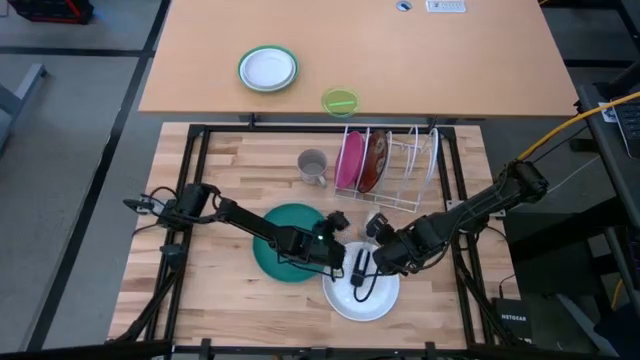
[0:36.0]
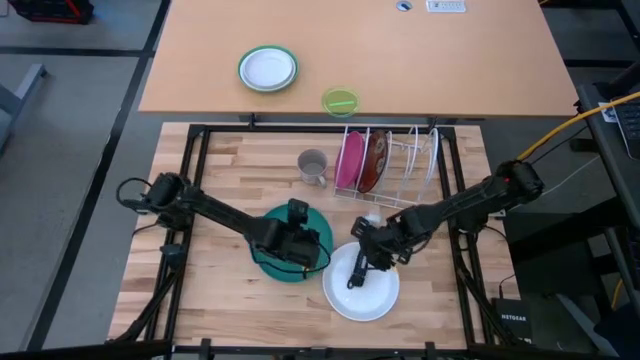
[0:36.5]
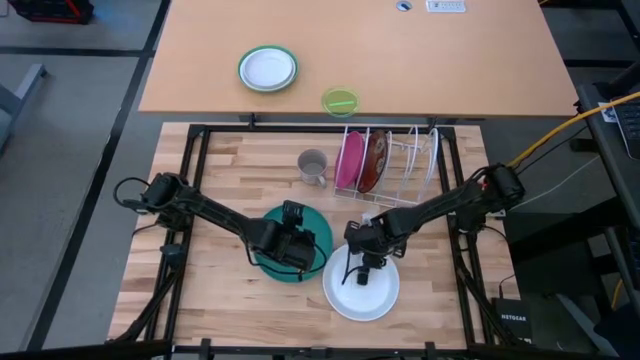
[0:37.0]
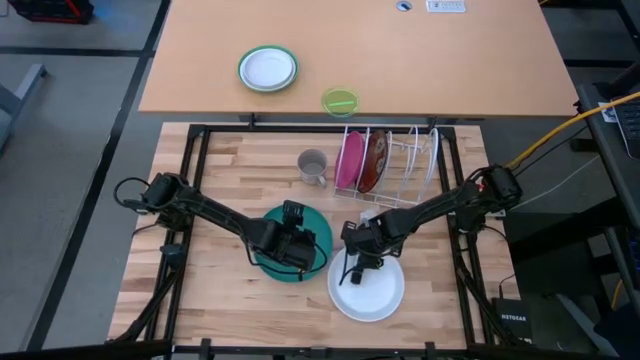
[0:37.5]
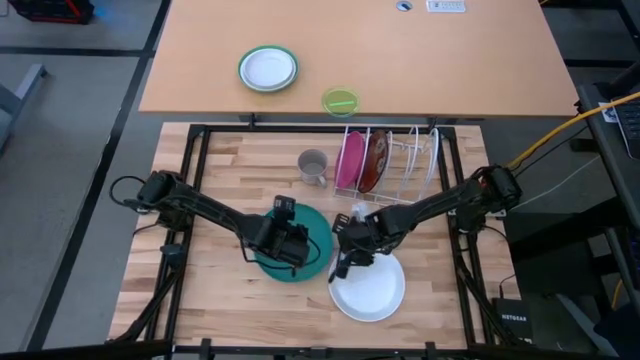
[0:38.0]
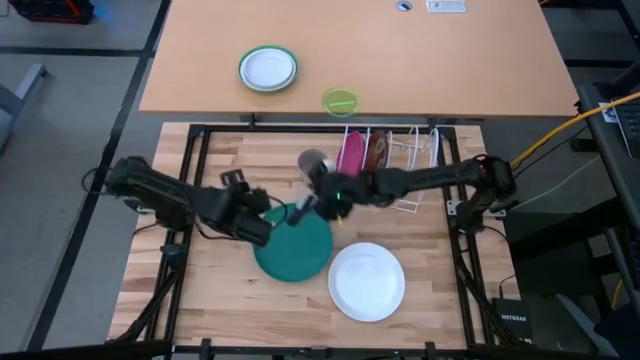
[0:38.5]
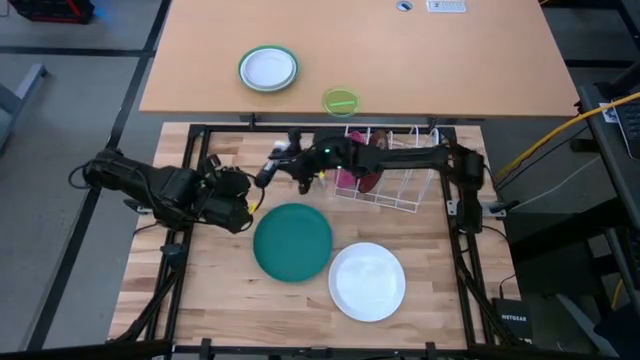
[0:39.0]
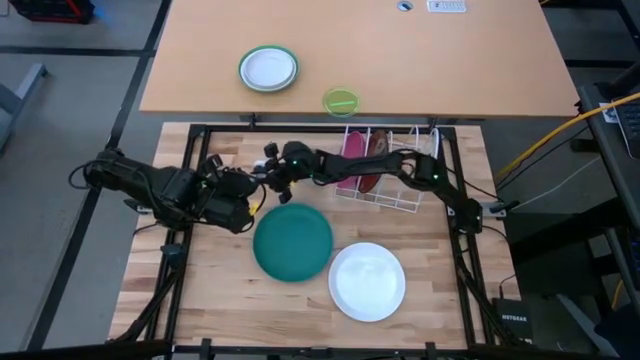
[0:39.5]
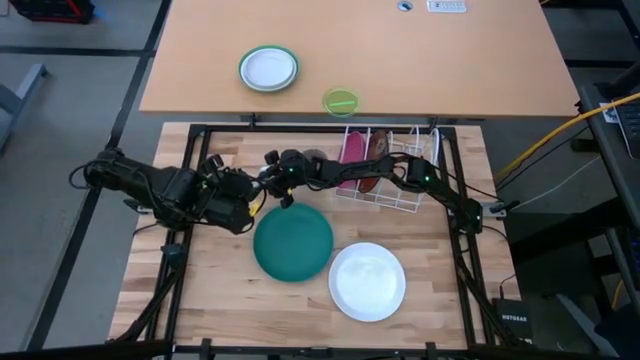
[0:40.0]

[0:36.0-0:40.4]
Task: Sort dishes
Move the black dish brush to the top left of the table

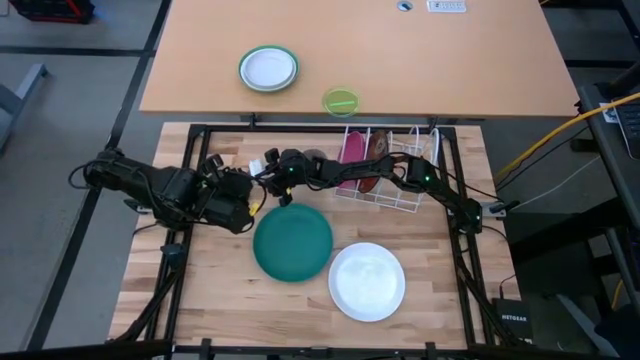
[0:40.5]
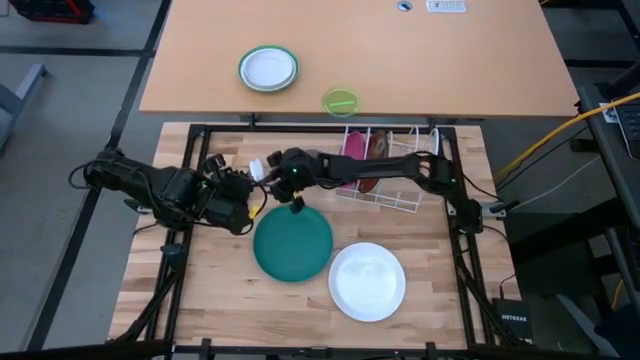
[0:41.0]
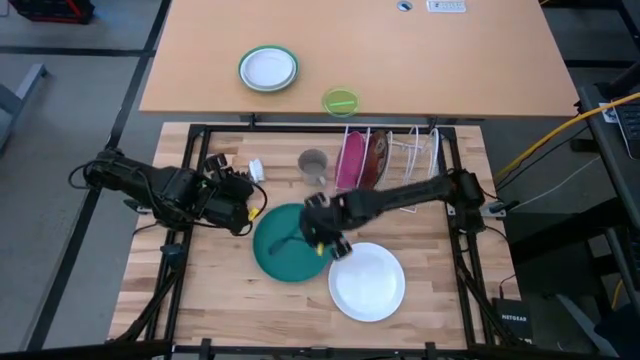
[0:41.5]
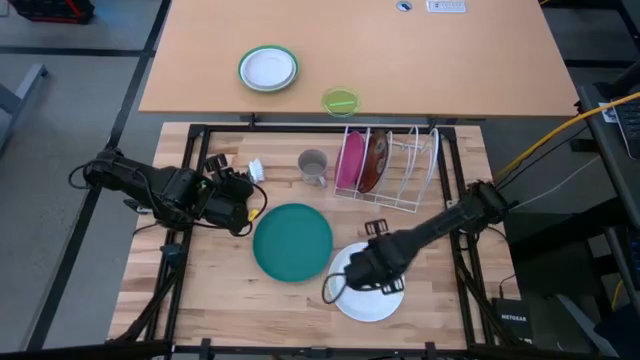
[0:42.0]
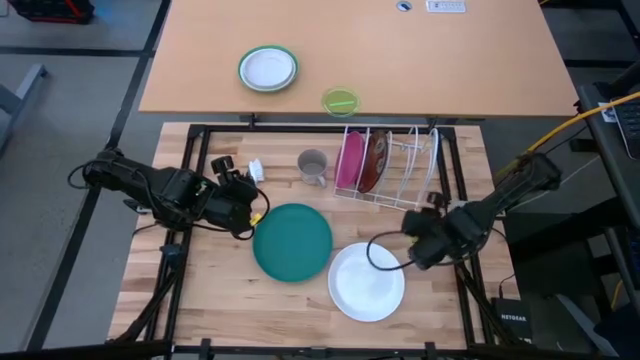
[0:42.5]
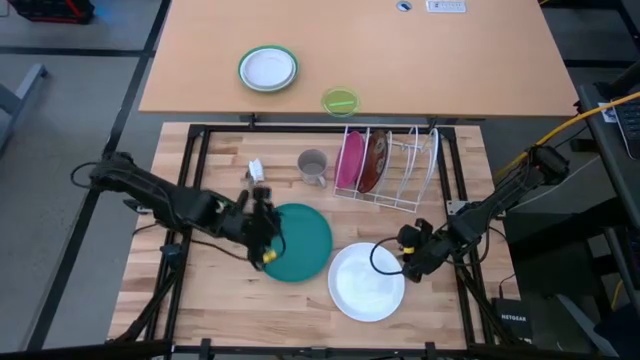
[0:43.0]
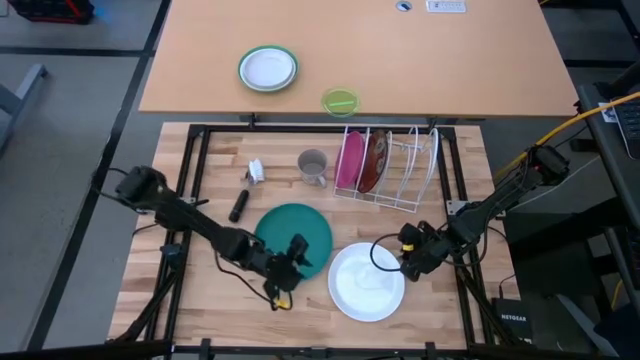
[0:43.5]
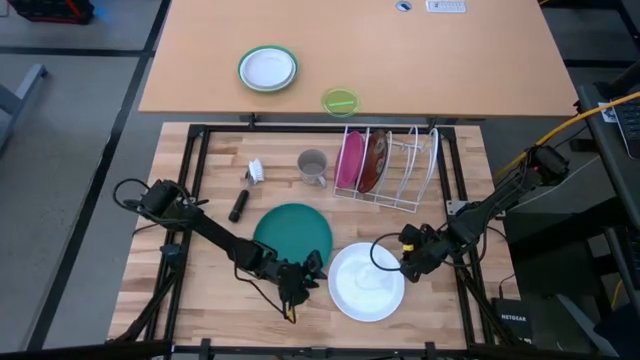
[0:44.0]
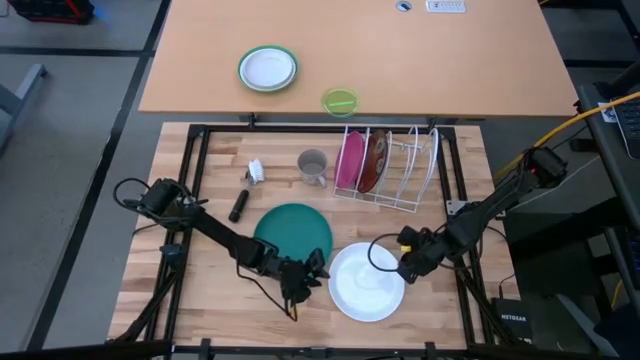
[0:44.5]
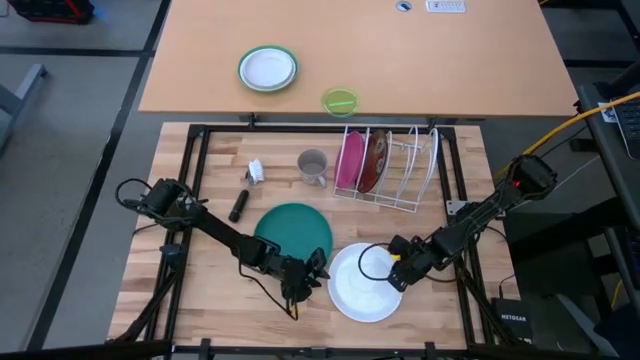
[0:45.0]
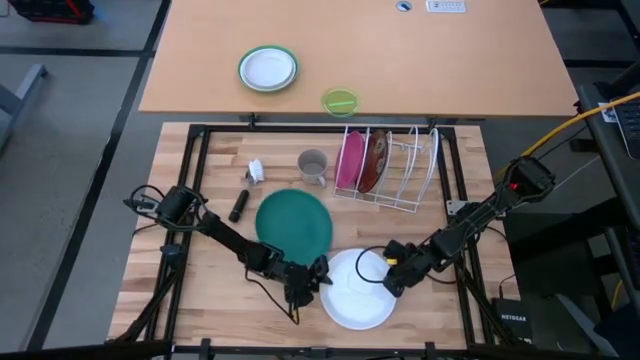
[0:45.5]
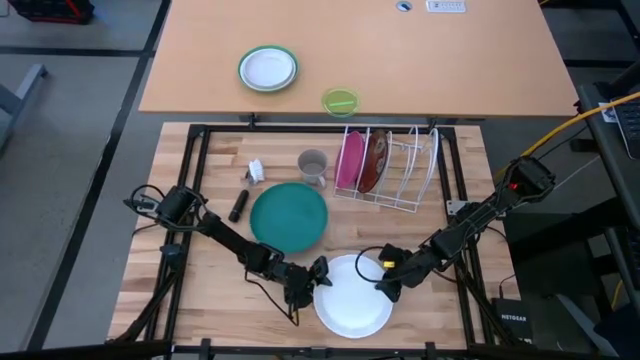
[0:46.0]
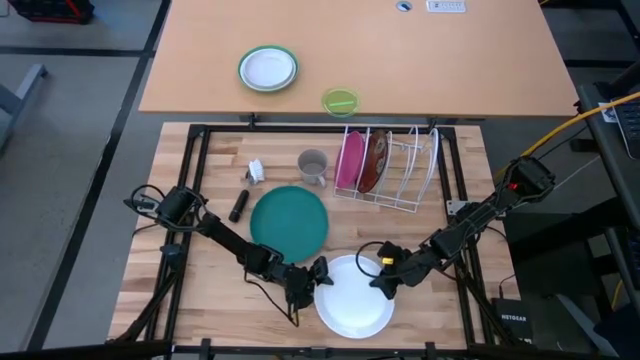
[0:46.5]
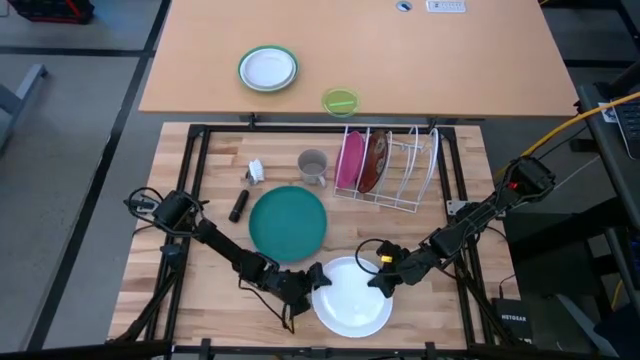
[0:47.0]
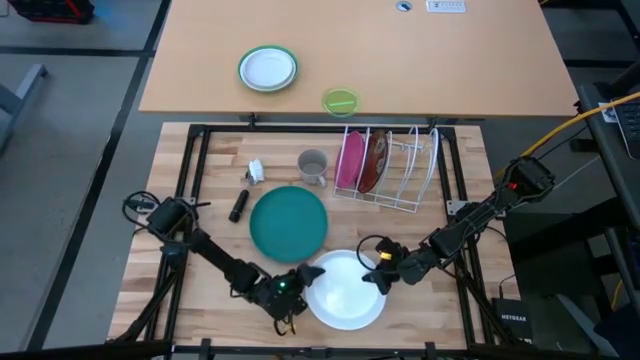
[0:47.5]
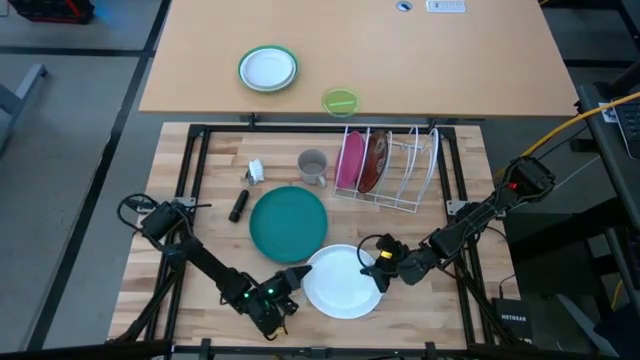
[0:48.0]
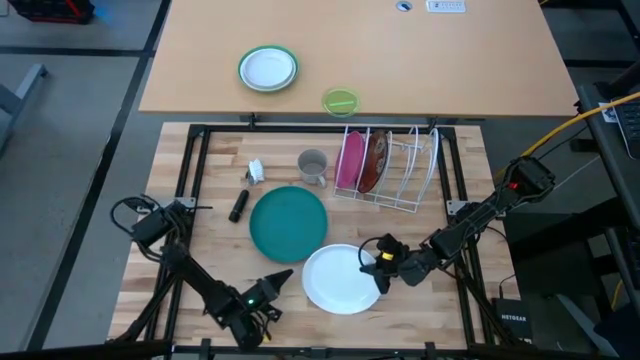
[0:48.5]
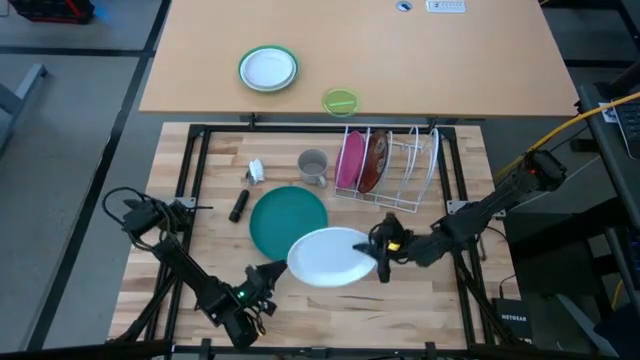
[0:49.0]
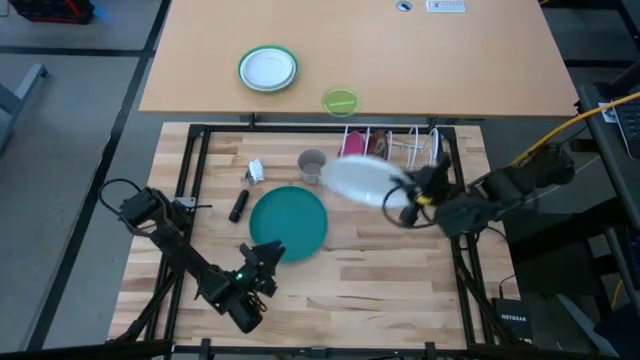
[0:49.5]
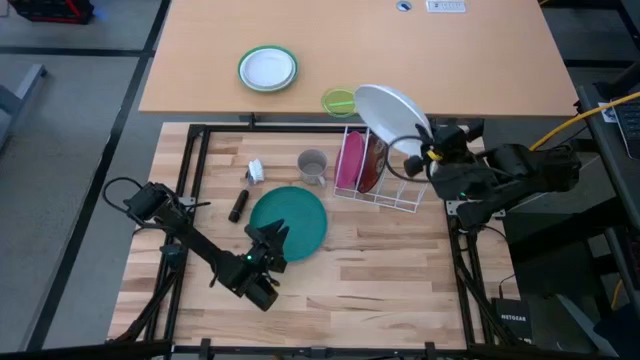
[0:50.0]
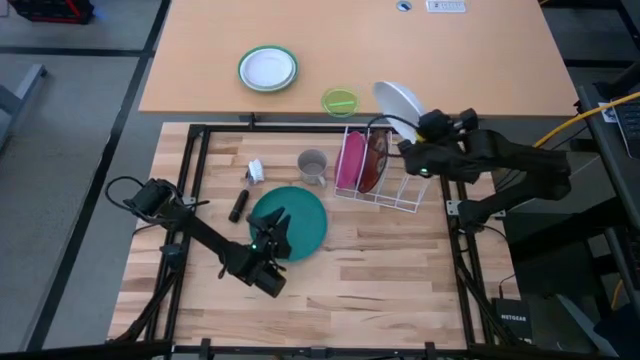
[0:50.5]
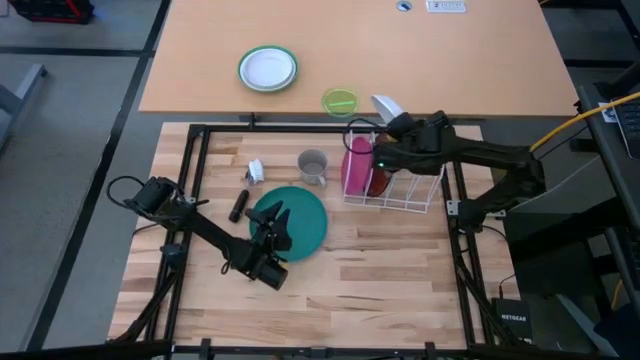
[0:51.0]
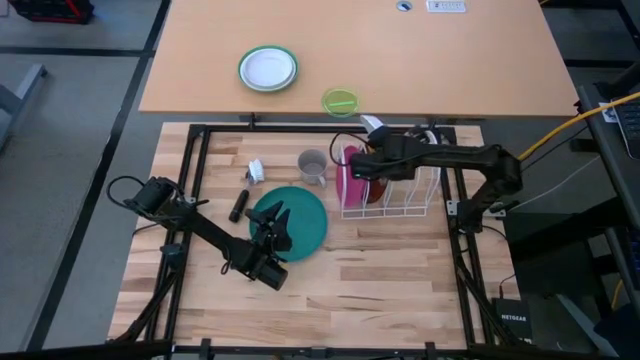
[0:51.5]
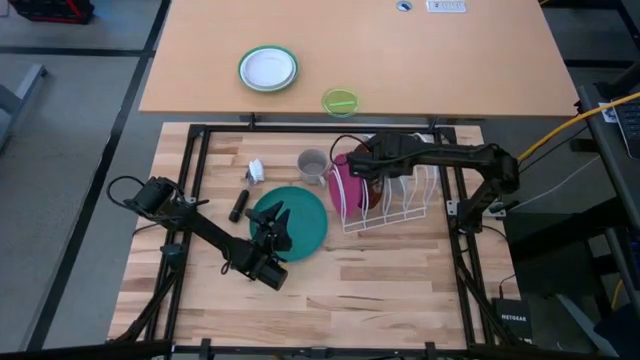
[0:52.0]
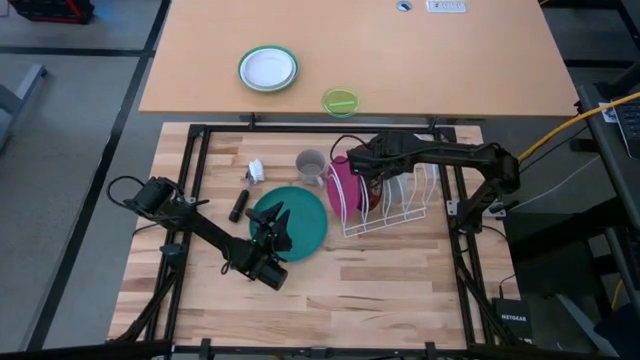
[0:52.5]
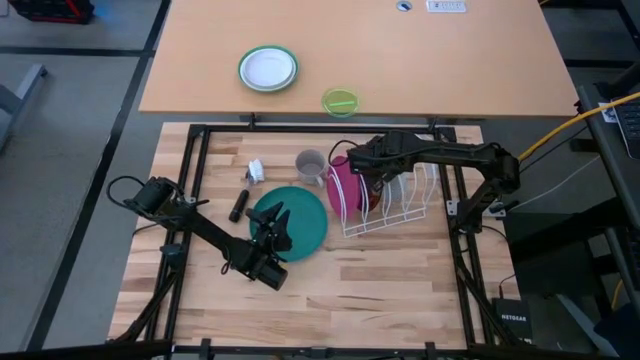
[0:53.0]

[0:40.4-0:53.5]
Put the white plate in the white dish rack

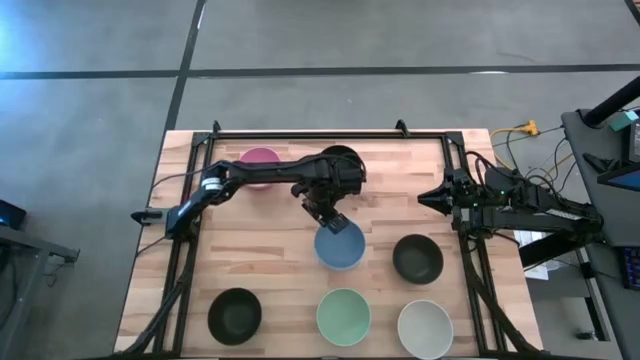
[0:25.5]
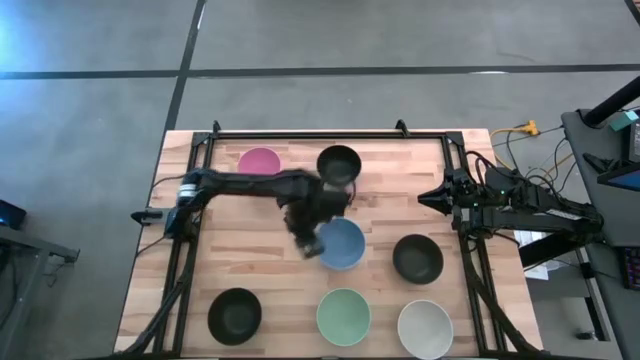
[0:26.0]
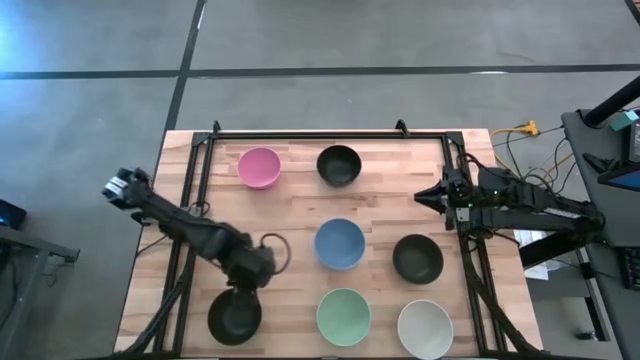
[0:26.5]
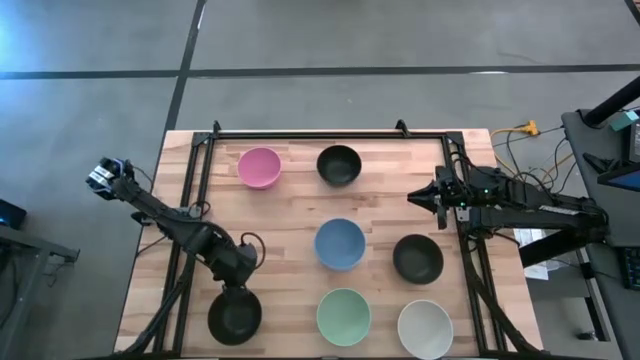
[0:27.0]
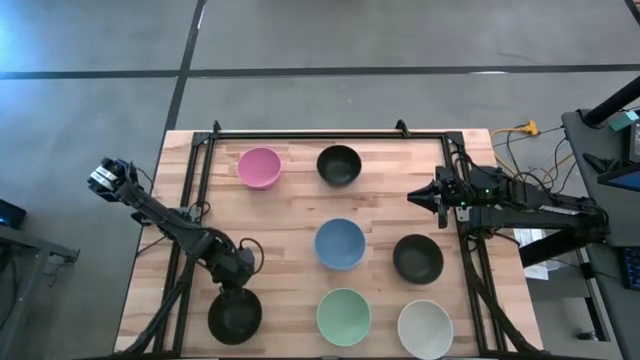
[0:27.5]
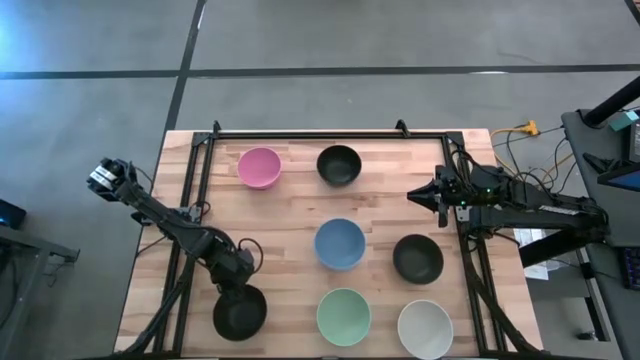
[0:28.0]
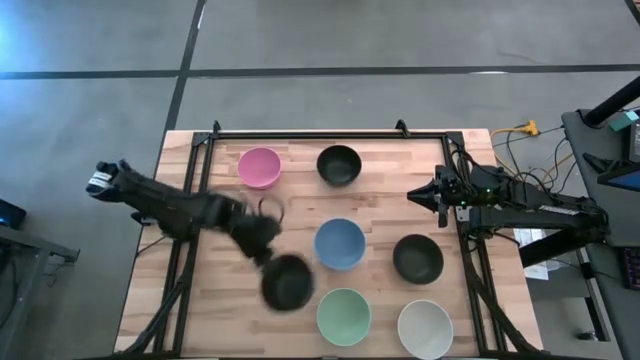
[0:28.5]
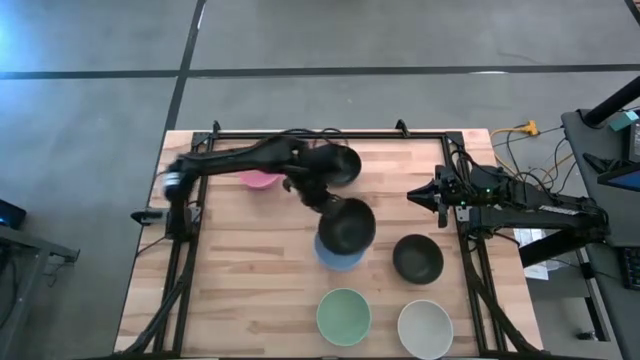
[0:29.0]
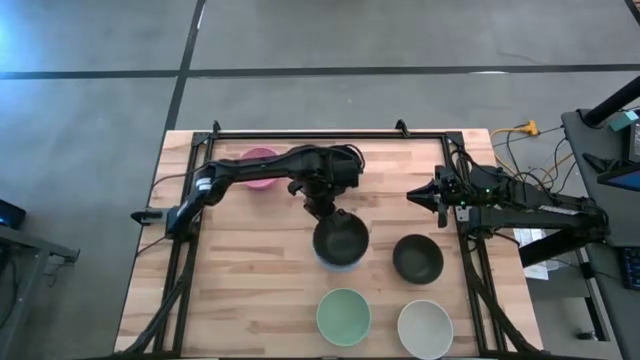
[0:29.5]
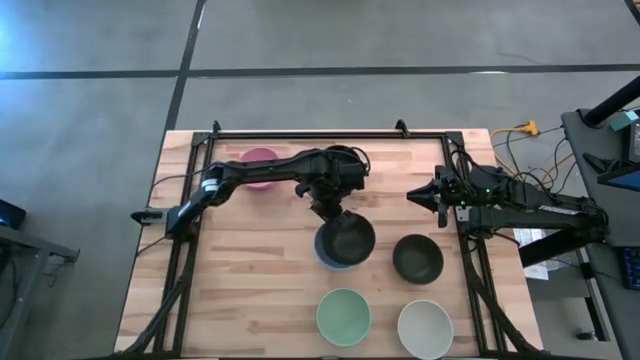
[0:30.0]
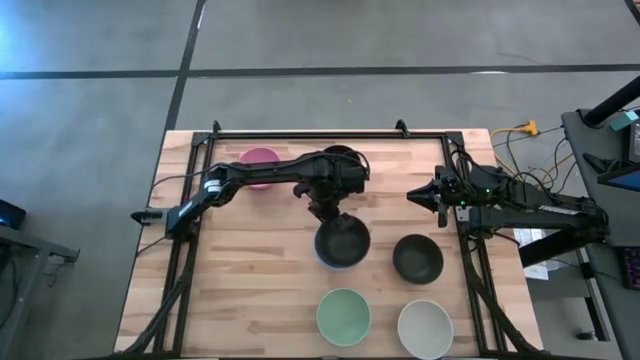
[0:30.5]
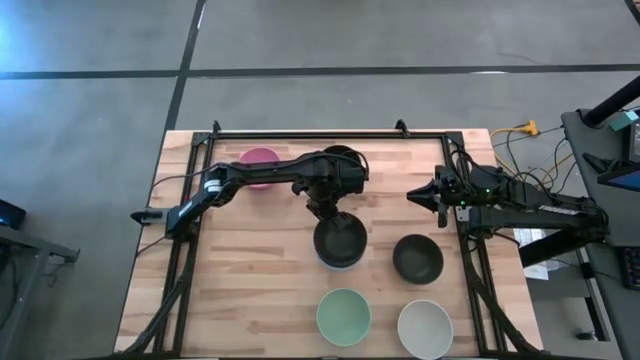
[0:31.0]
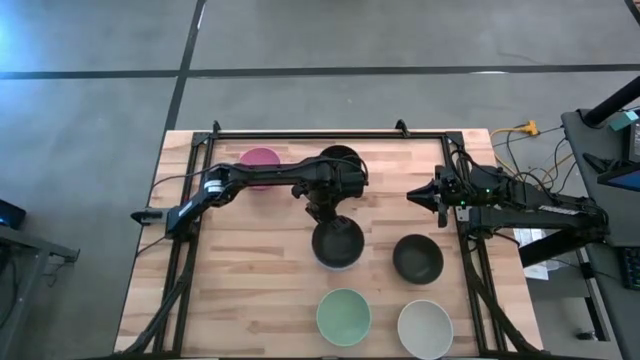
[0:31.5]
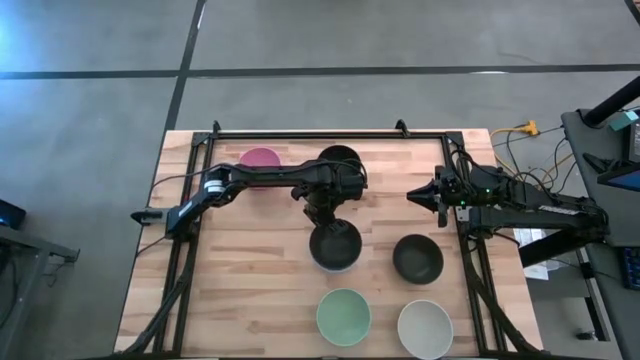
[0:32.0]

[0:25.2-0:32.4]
Task: Nest bowls inside each other
Stack the bottom left black bowl on top of the blue bowl
